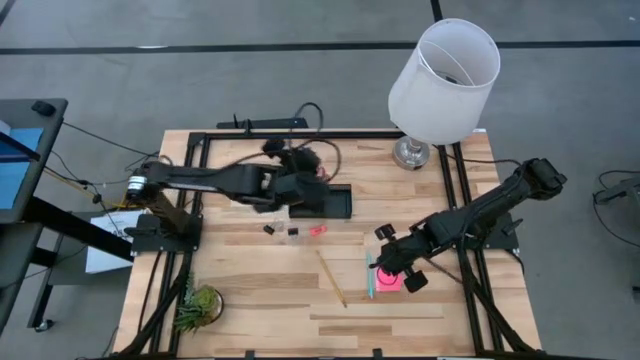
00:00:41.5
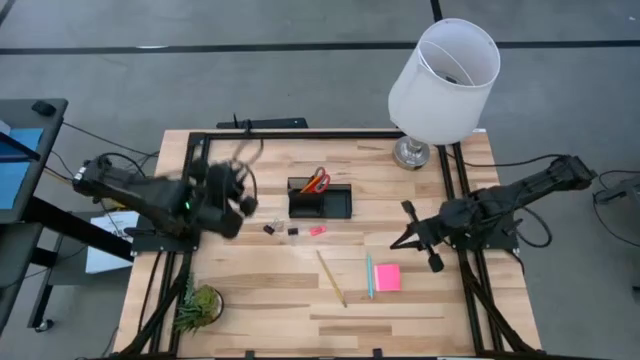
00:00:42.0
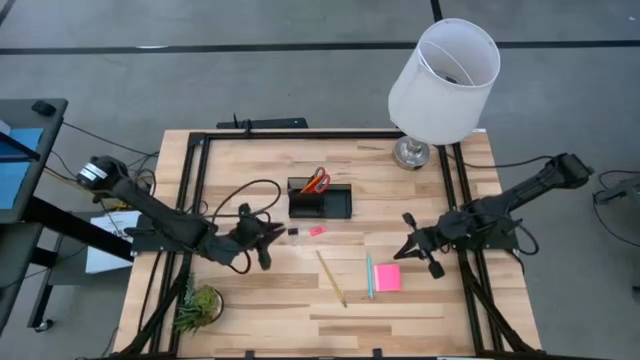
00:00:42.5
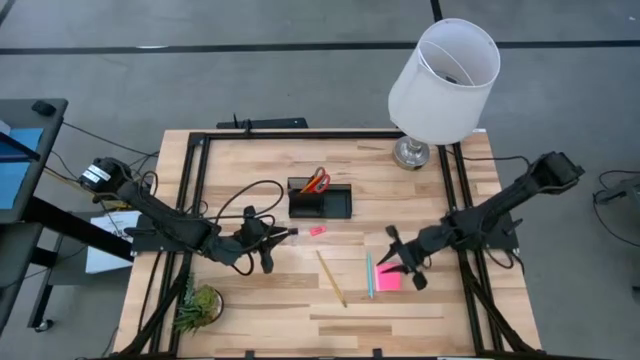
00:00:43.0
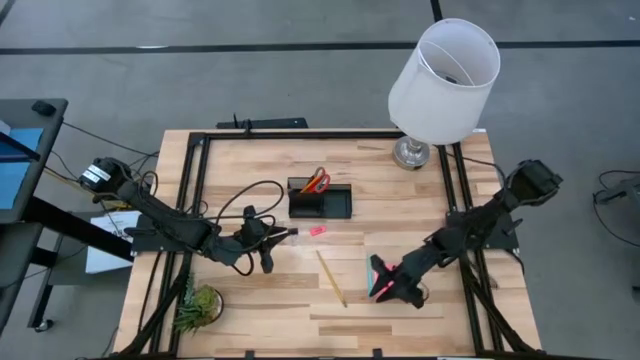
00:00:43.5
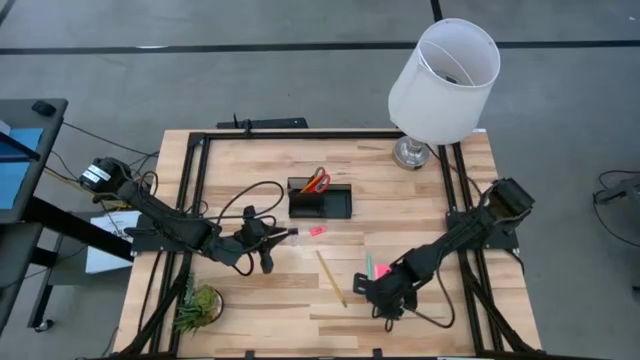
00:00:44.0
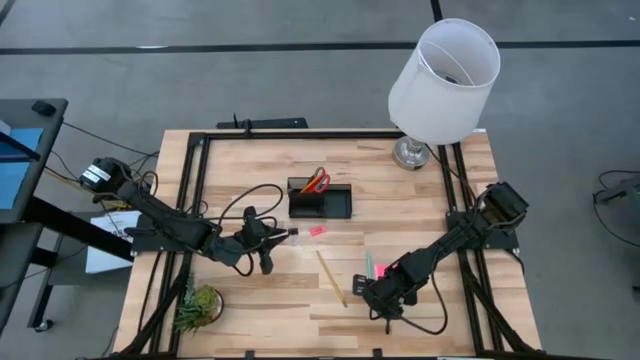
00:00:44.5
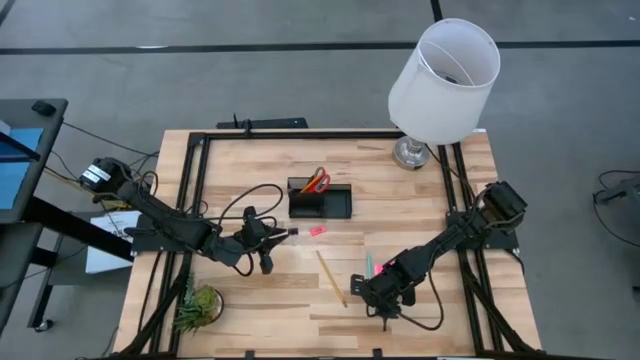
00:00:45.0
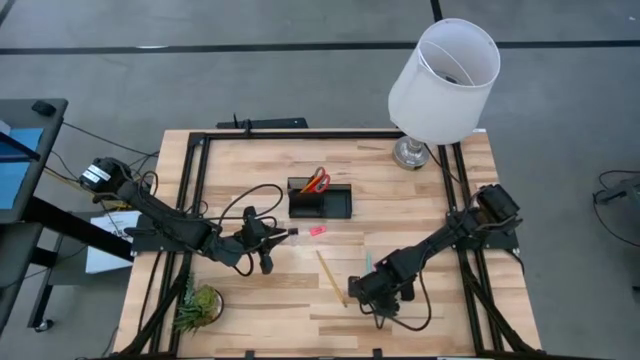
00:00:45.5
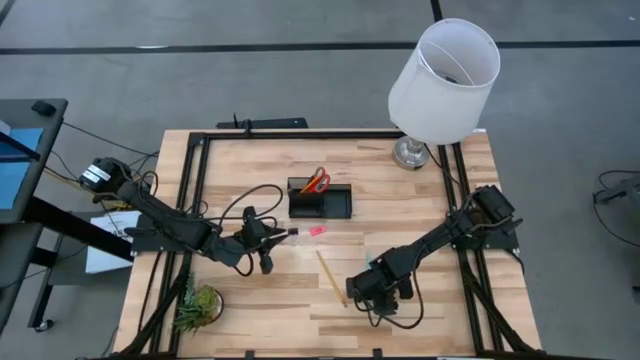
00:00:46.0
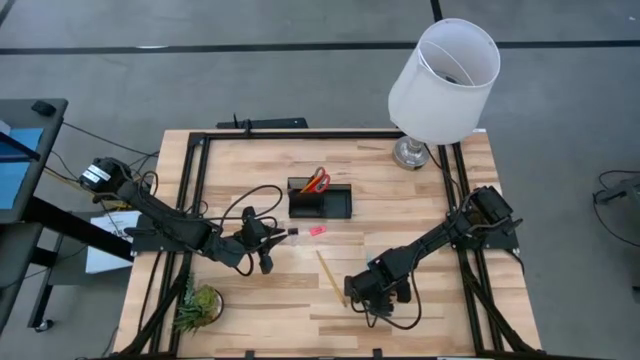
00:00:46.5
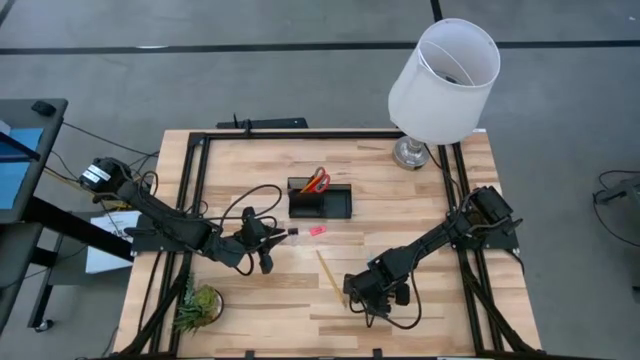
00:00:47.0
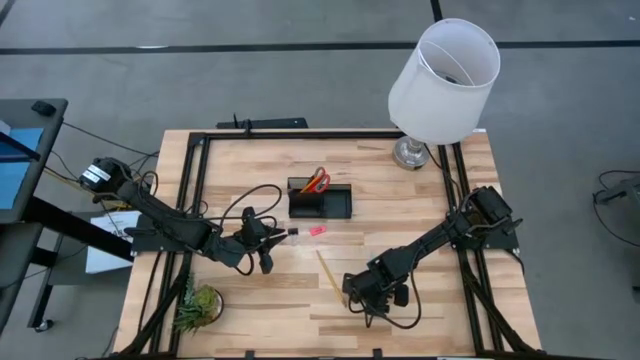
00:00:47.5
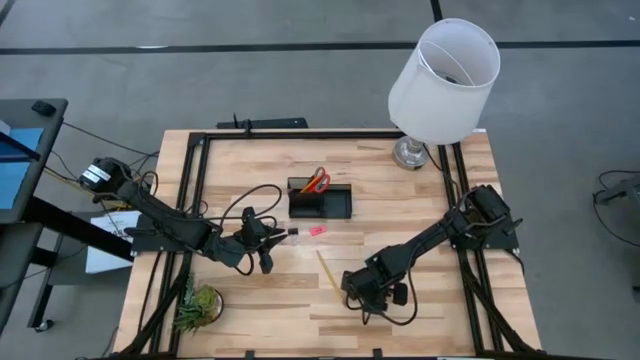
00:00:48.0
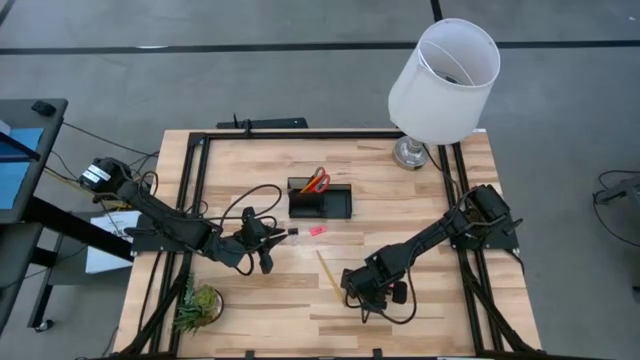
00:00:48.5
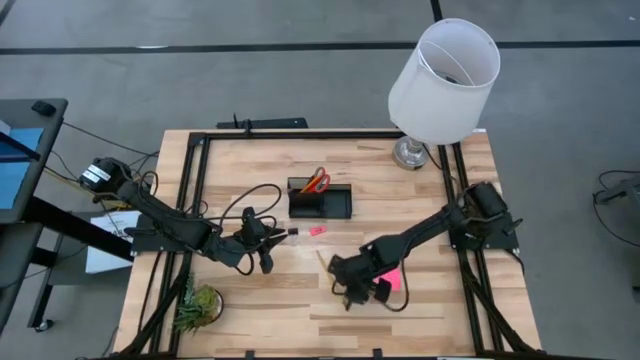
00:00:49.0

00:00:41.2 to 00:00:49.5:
Task: Pick and place office supplies into organizer
Put the blue pen into the top left compartment of the black desk organizer

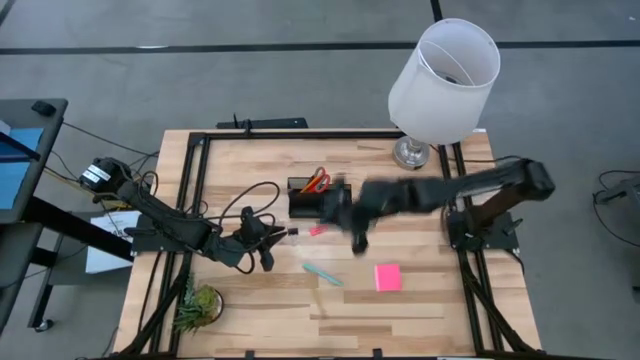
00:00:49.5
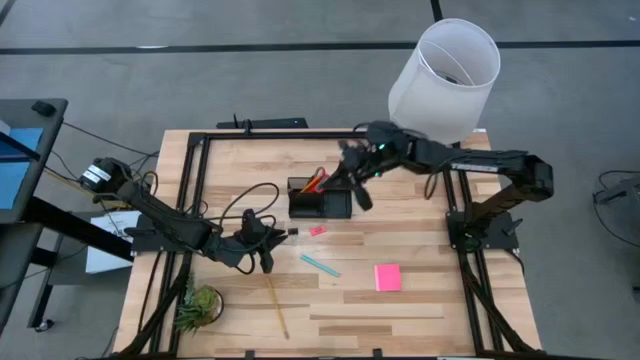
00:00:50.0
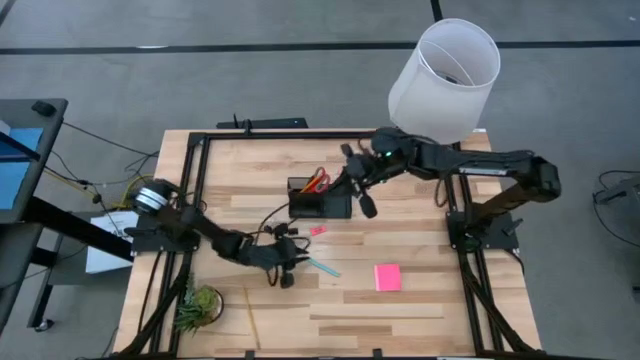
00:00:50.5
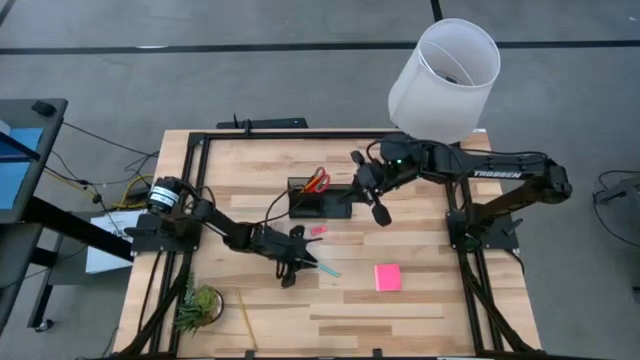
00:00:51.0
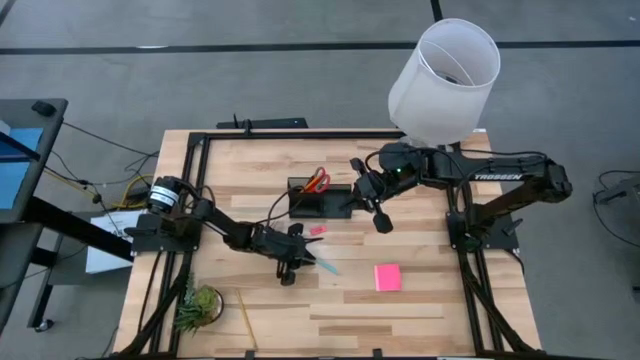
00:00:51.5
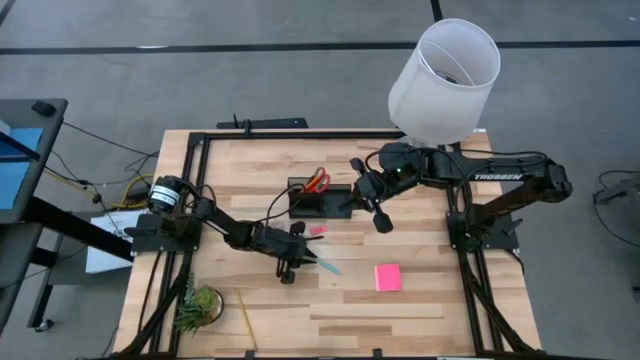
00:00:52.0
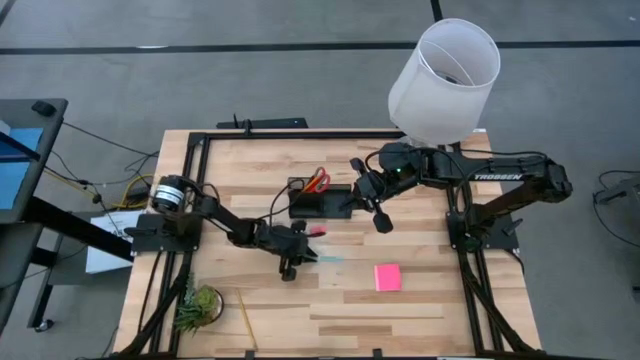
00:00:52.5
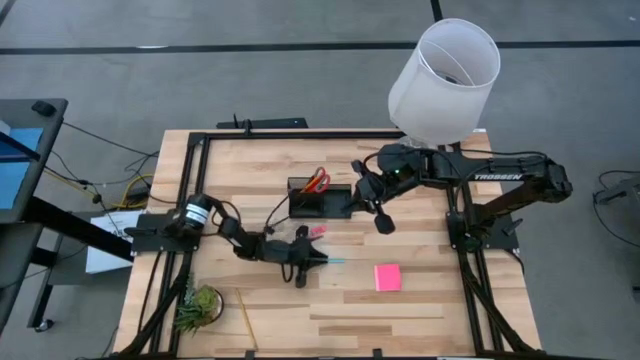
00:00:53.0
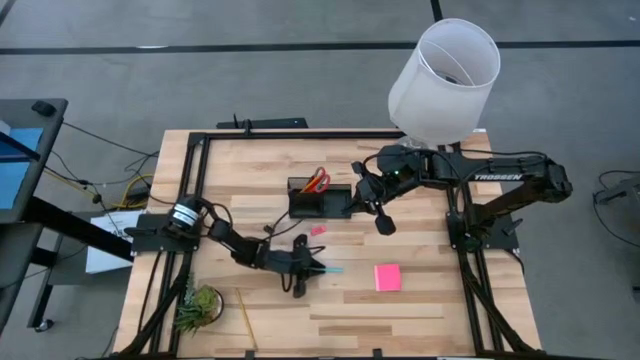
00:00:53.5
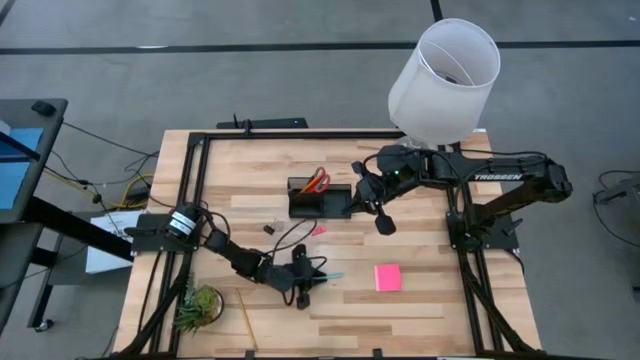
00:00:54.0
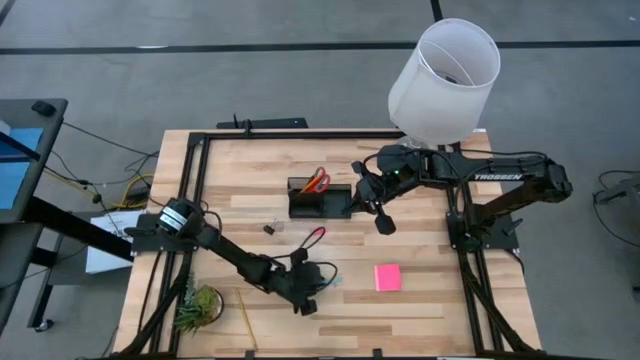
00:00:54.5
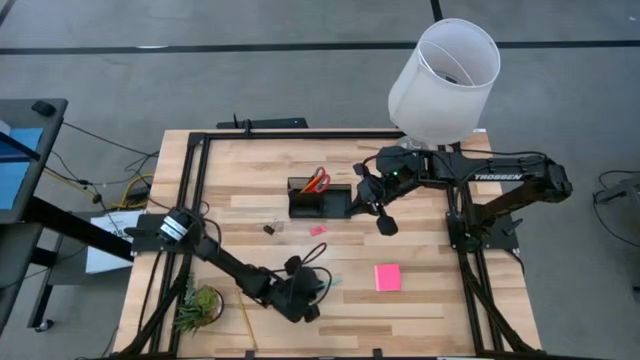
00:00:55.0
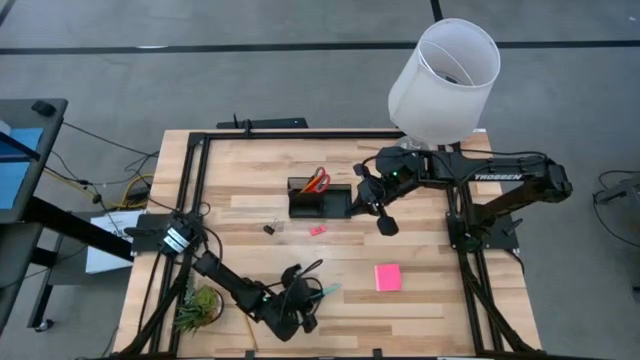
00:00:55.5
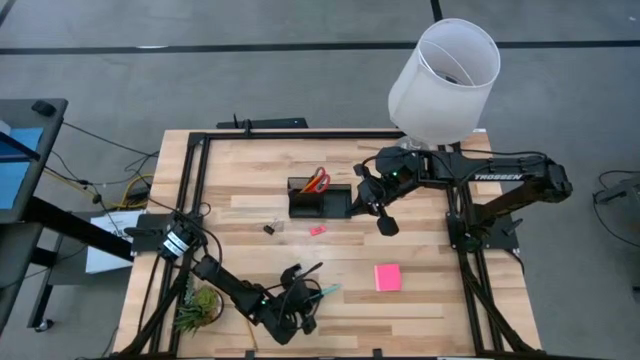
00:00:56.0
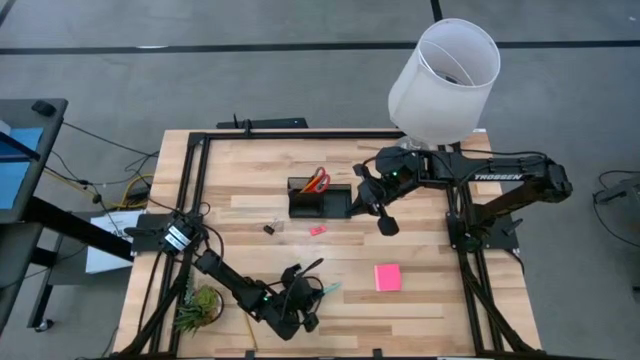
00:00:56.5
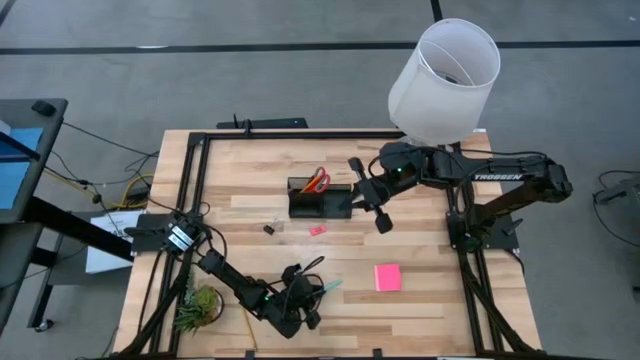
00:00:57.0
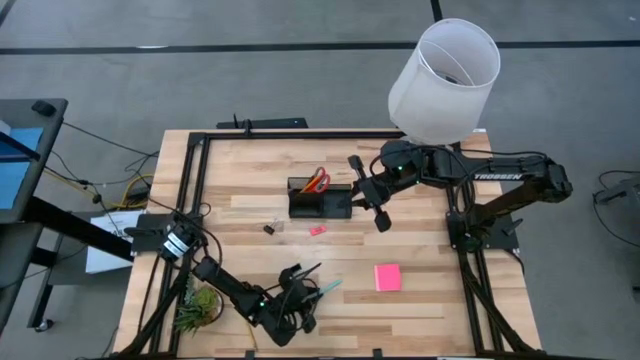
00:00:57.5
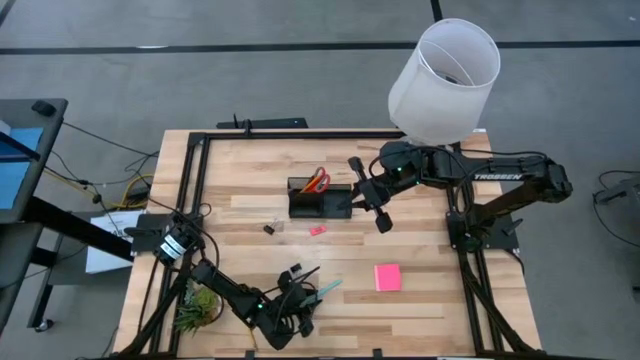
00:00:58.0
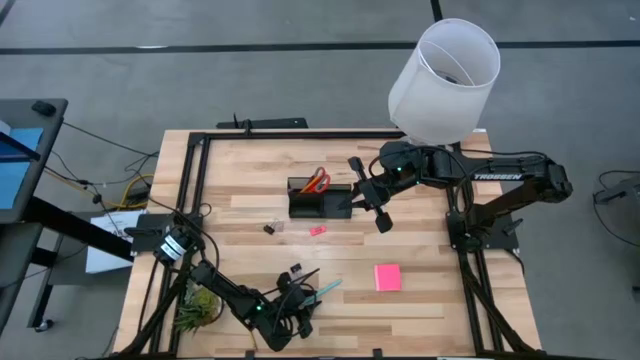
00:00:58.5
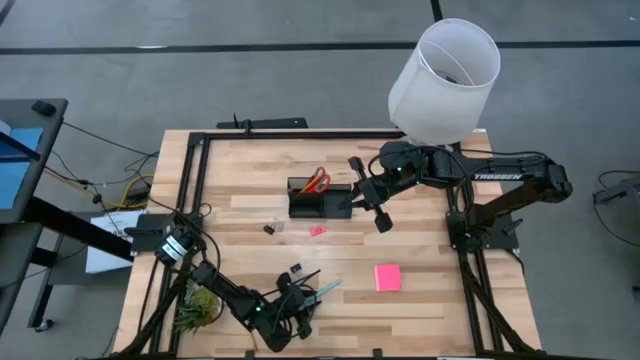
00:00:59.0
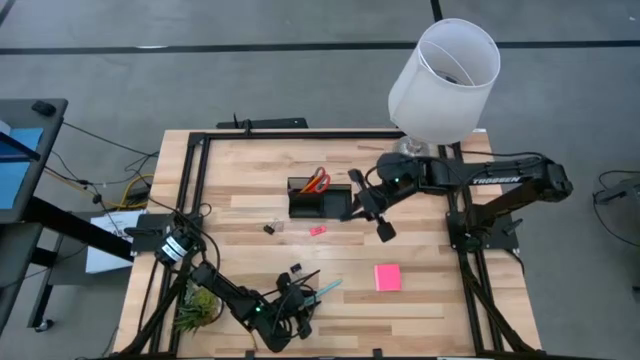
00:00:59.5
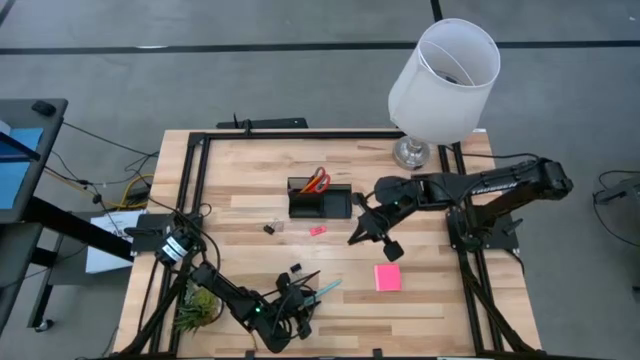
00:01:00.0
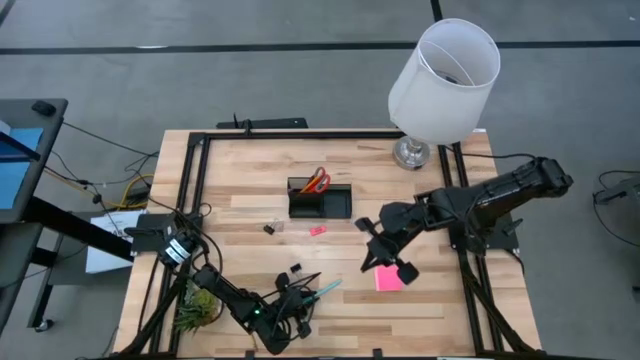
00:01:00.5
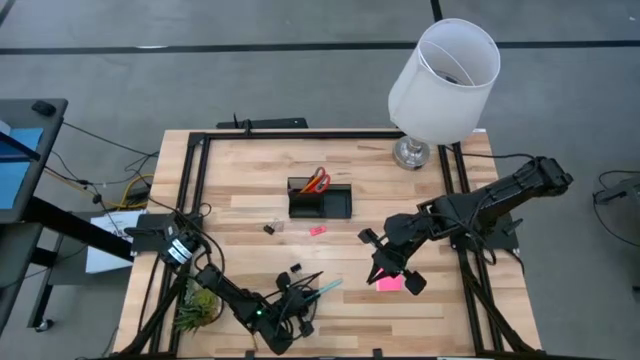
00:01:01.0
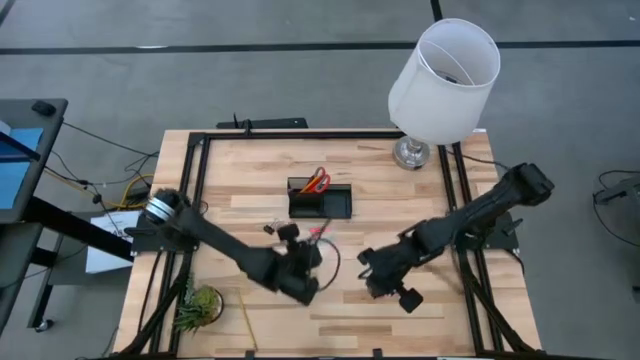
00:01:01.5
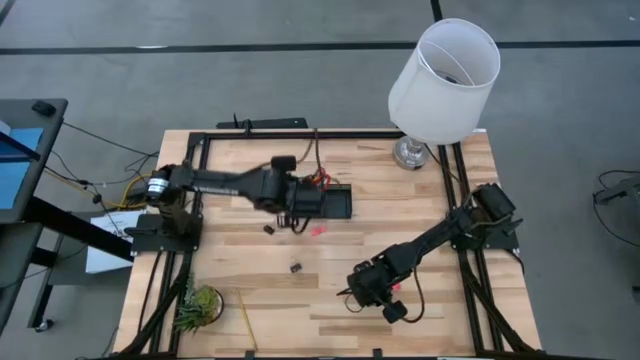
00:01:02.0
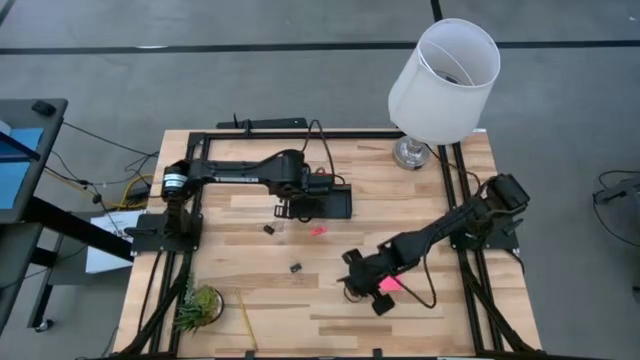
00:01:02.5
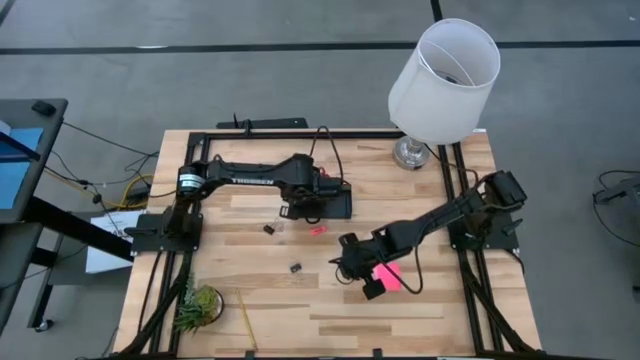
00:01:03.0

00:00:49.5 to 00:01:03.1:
Put the blue pen into the top left compartment of the black desk organizer
